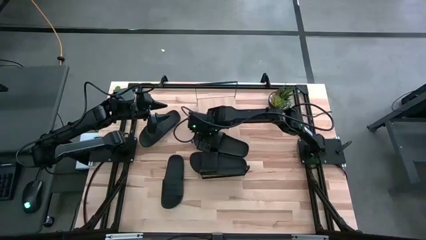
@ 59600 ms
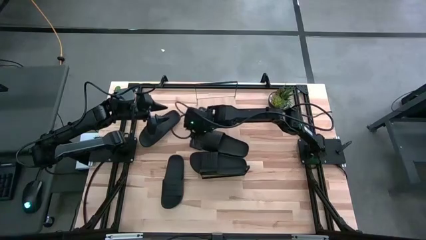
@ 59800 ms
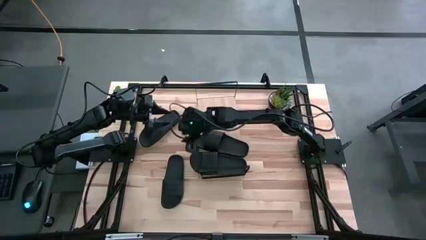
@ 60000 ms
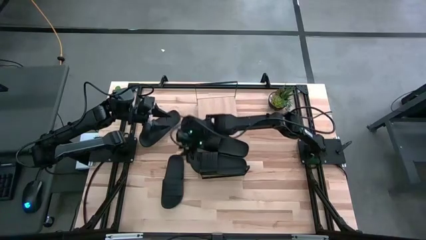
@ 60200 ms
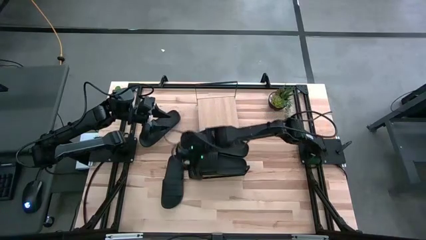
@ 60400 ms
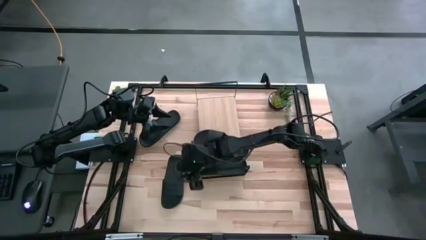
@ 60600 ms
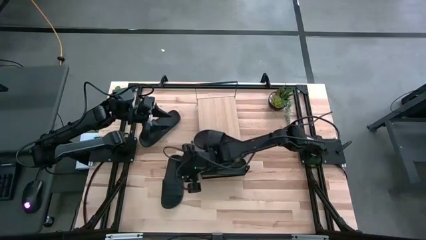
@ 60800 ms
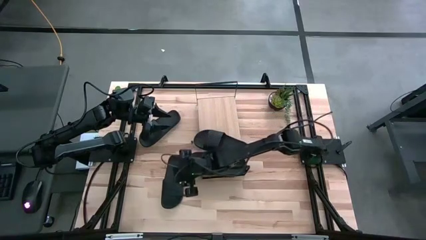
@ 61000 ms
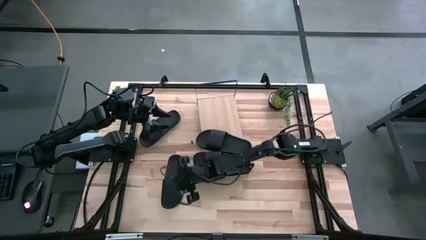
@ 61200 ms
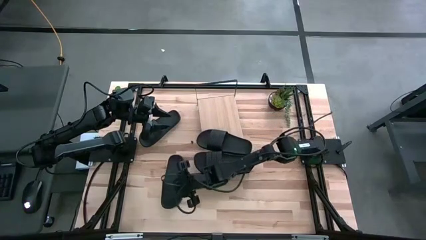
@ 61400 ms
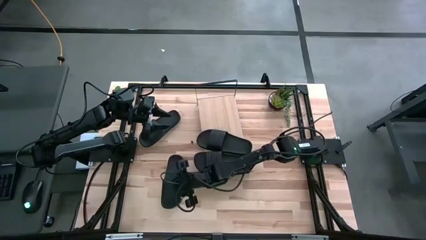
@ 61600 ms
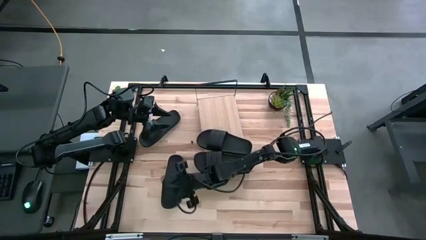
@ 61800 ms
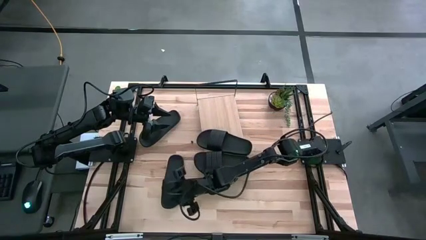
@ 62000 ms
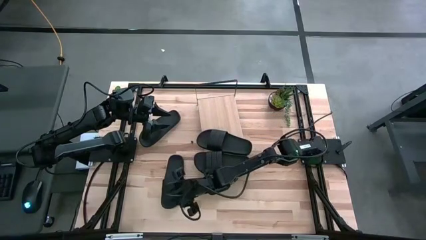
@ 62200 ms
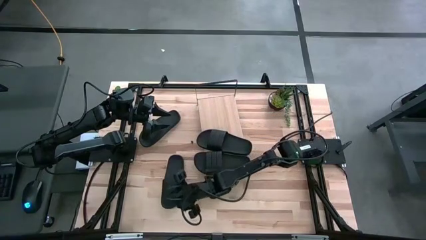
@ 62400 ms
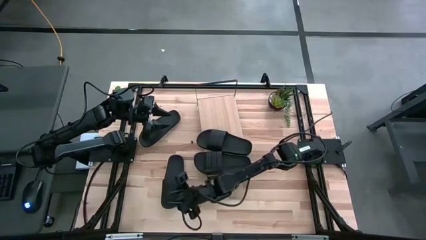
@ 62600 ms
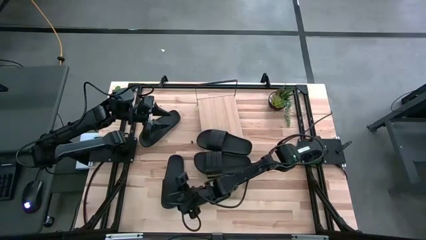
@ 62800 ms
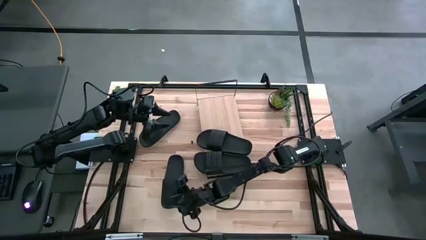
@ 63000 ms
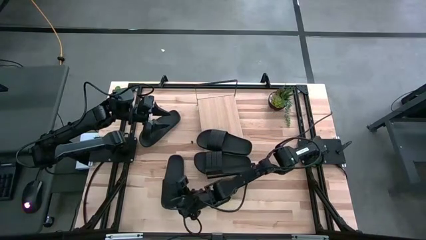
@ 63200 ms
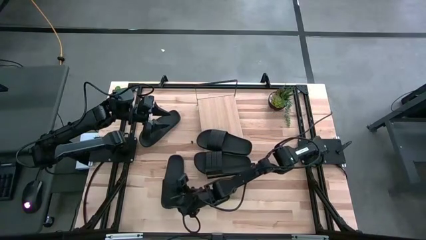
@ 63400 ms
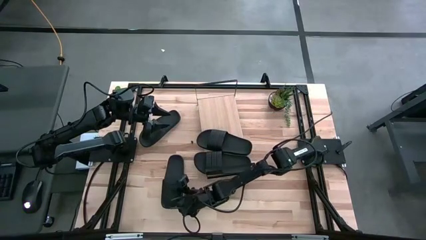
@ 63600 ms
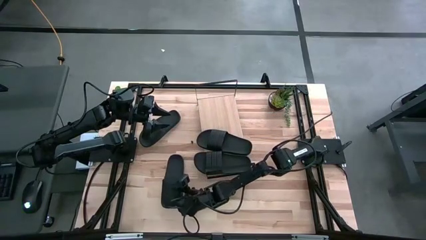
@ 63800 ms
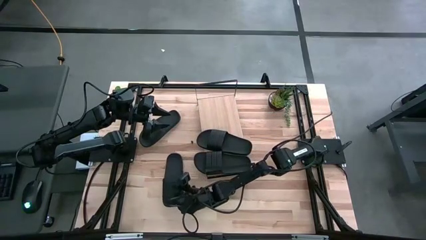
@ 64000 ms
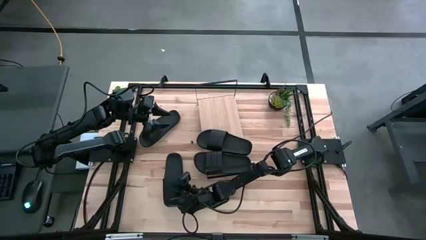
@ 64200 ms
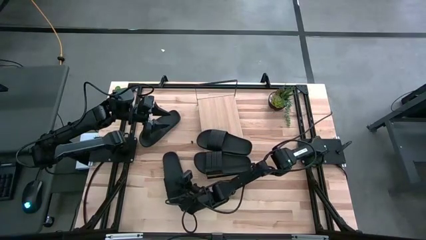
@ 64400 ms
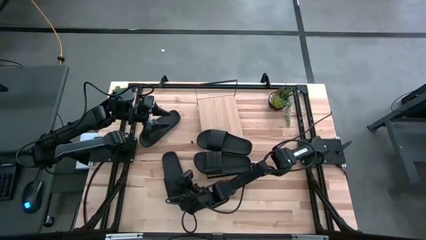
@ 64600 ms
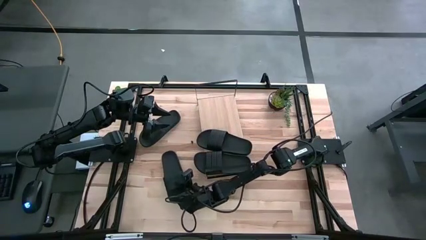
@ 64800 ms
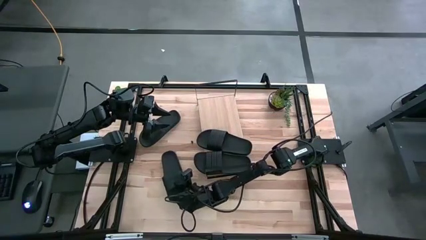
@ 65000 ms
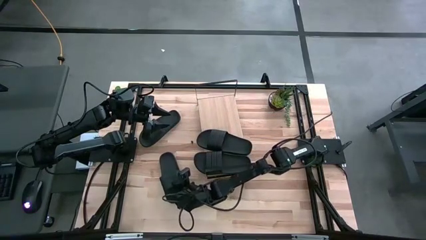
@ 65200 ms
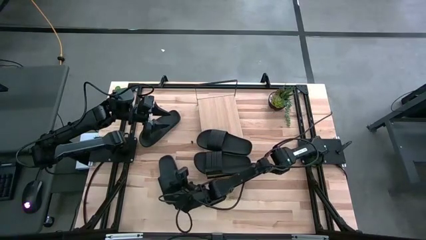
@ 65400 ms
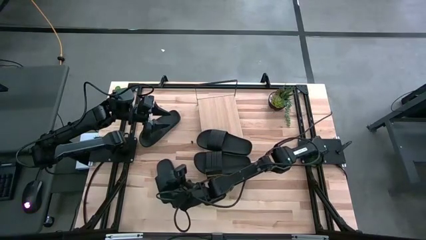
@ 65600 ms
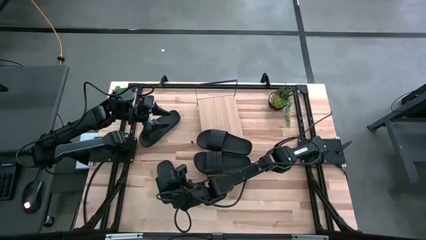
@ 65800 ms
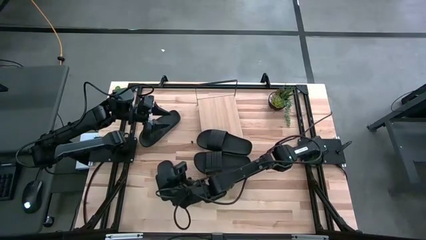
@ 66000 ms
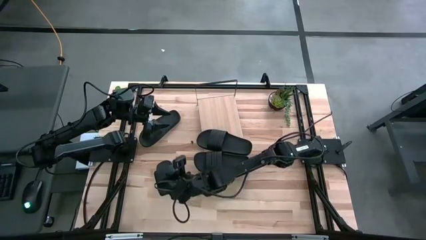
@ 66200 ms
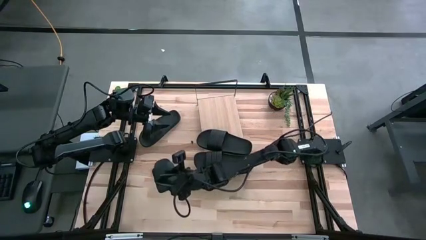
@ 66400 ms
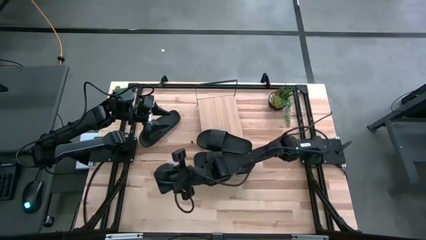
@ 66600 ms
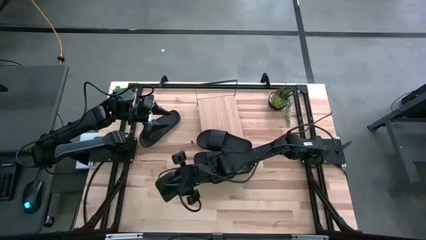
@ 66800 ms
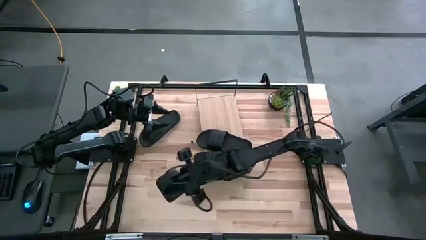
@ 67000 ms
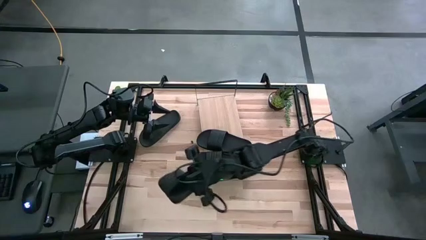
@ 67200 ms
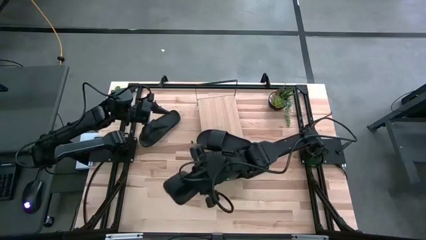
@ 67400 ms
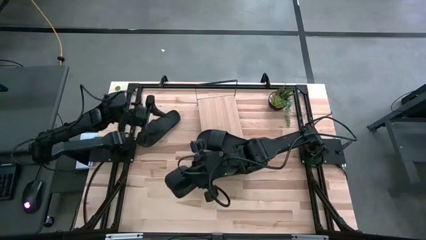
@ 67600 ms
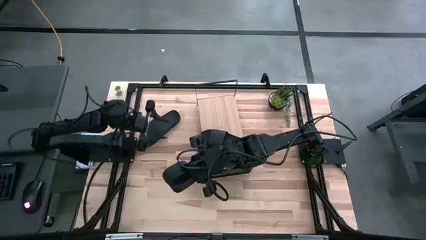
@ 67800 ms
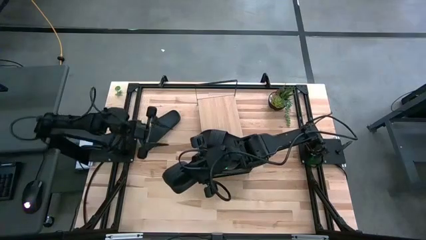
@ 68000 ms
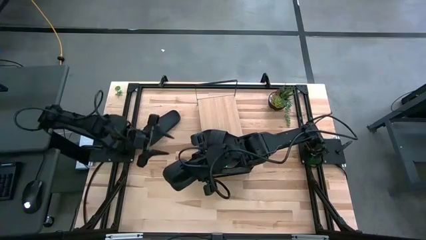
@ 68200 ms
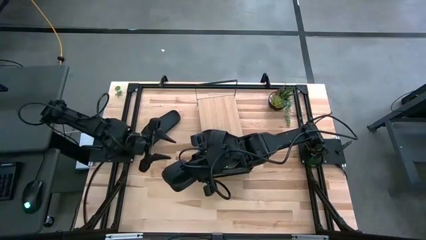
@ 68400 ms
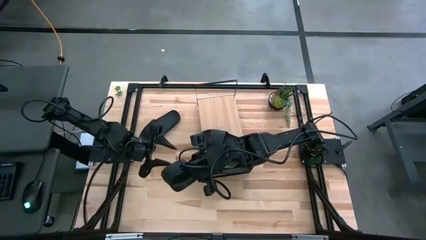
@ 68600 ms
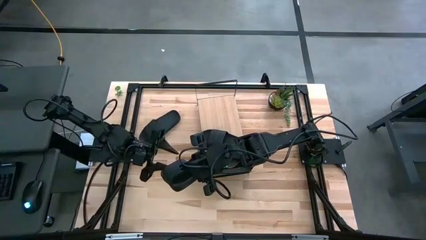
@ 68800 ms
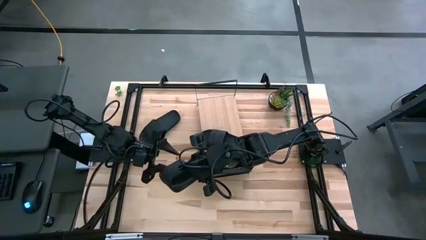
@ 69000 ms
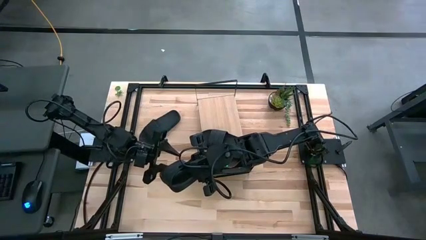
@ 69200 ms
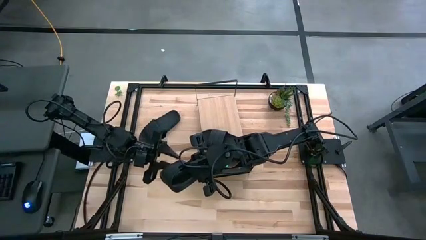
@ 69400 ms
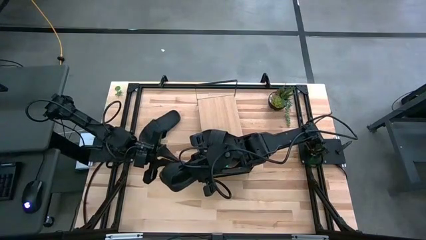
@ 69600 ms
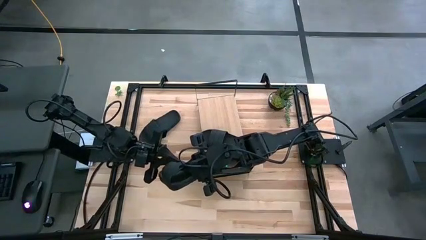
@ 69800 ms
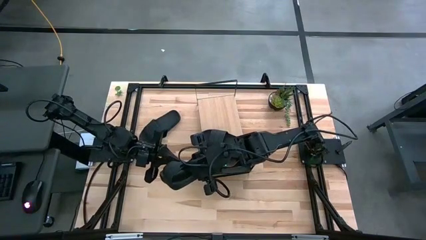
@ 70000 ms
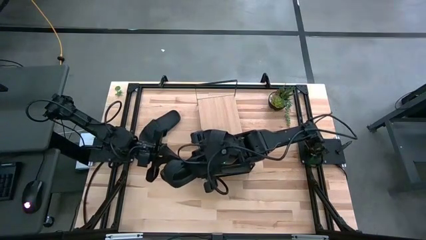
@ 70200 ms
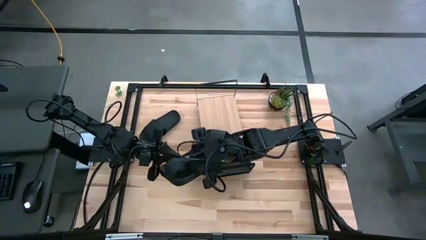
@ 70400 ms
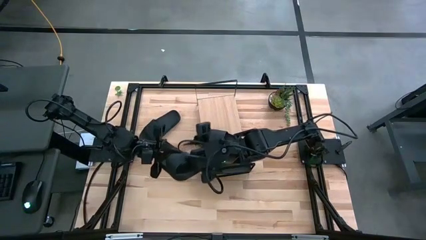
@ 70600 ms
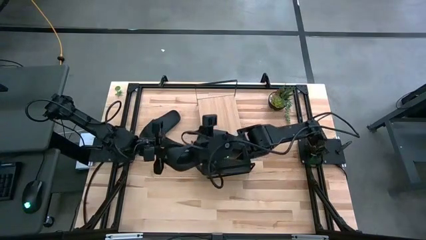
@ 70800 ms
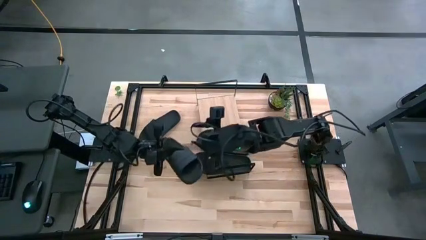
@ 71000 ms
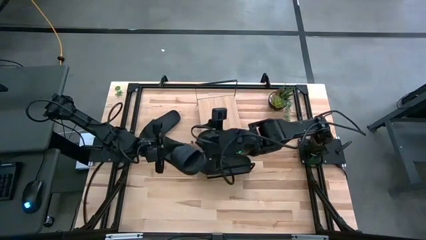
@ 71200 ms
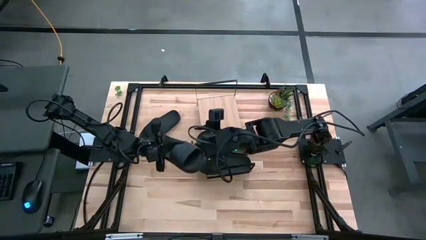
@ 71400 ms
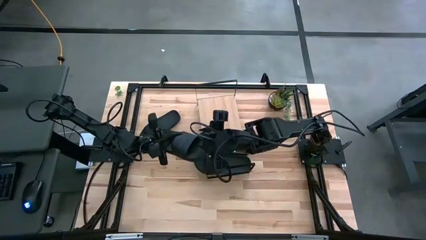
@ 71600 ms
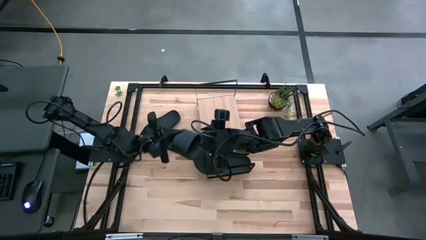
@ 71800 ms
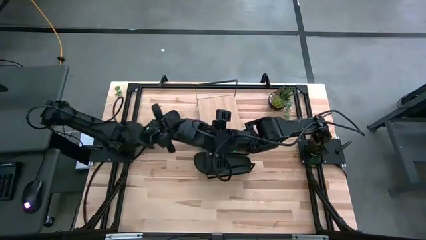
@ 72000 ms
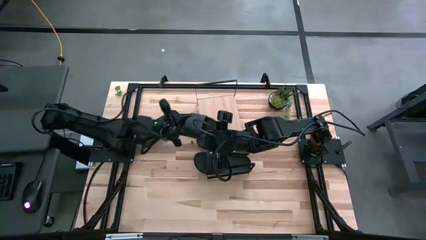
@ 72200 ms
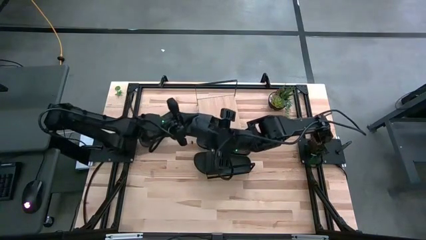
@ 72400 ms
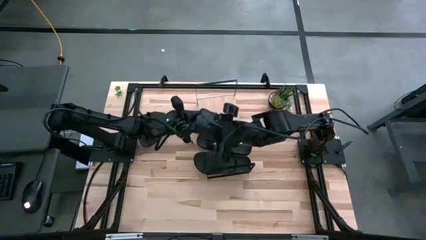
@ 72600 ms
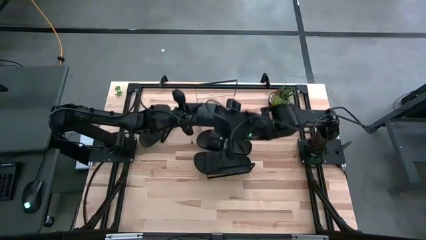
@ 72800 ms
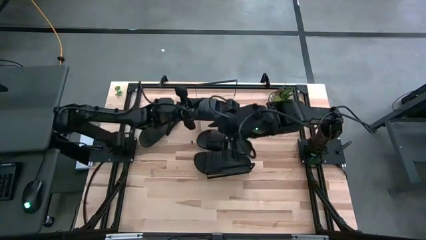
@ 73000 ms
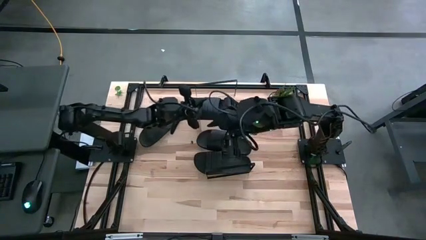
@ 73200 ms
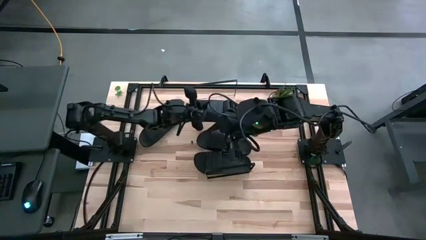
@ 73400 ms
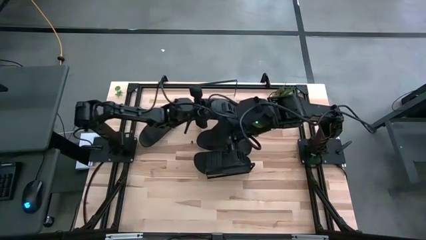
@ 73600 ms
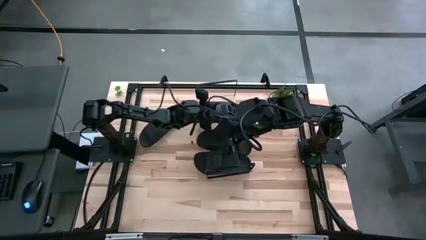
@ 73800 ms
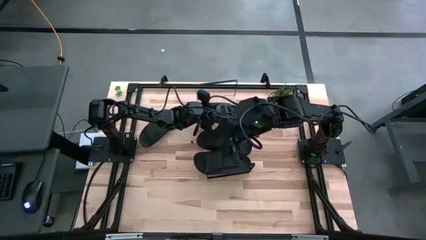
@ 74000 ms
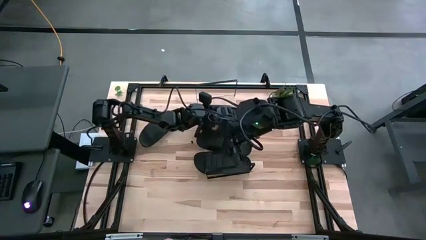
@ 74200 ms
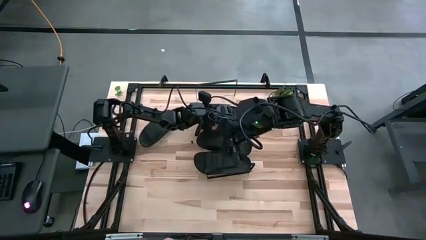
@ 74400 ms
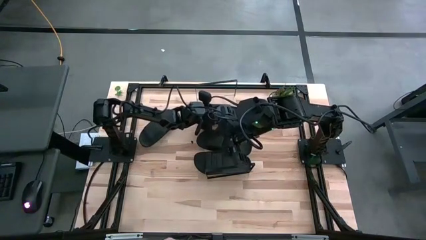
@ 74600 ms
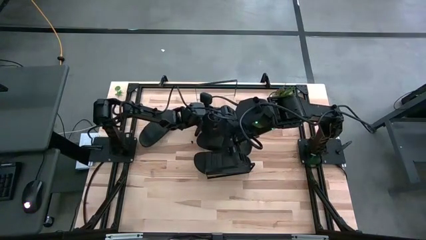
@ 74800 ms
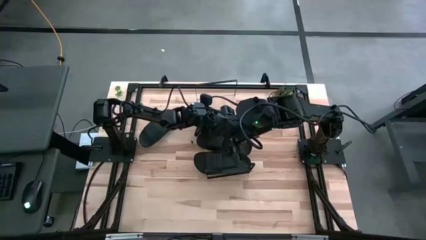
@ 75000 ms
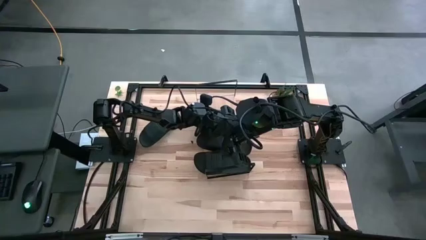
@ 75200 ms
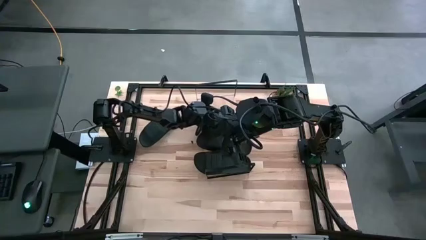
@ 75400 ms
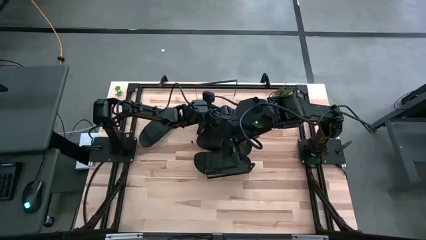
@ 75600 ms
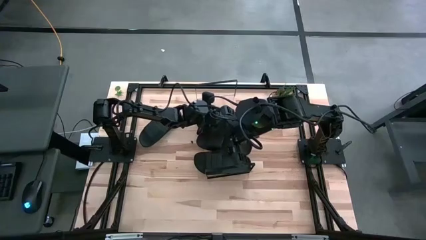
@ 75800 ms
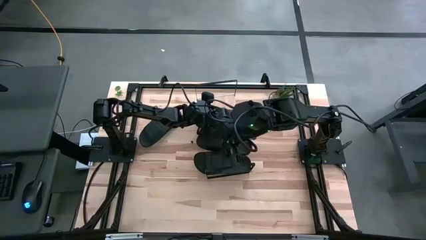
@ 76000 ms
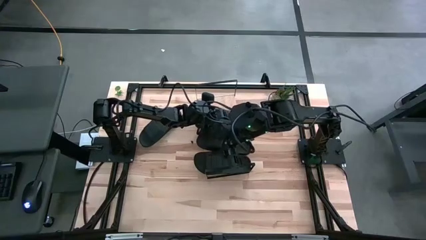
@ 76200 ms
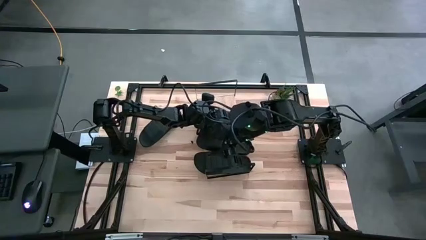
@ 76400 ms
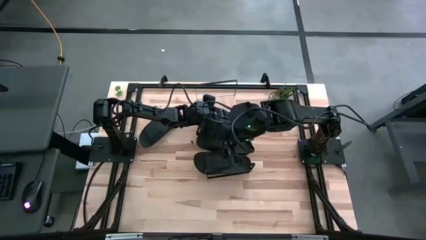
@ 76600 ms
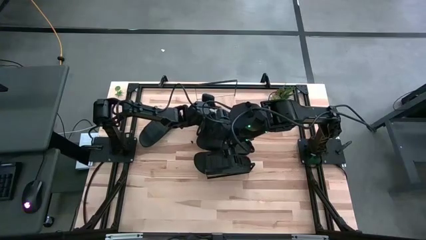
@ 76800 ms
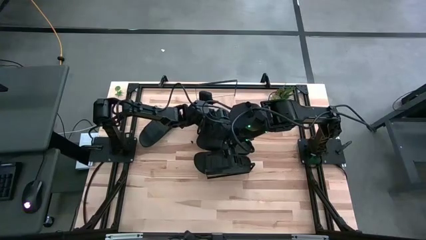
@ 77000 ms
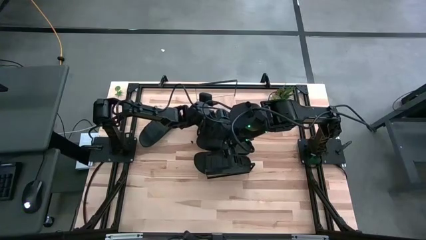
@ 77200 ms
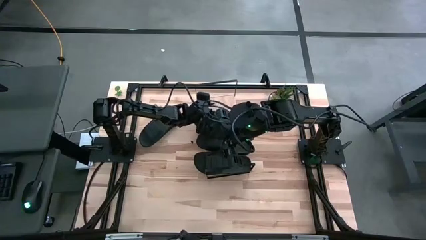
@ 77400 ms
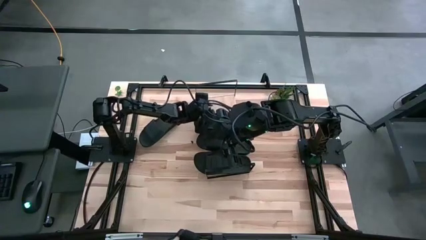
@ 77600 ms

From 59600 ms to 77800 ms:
Task: Pick and place slides into the shelf
Put the bottom black slipper on the shelf
